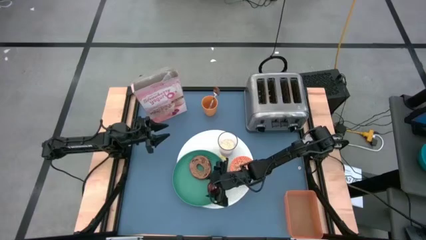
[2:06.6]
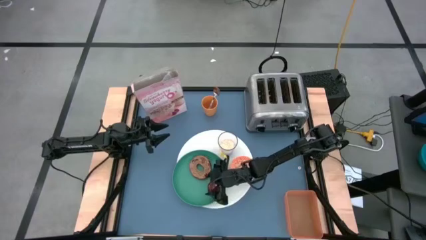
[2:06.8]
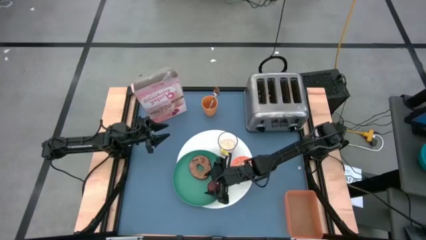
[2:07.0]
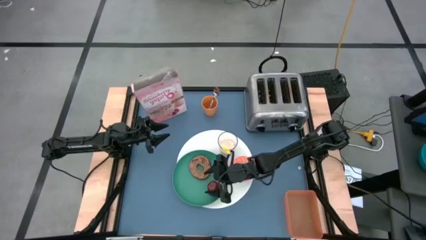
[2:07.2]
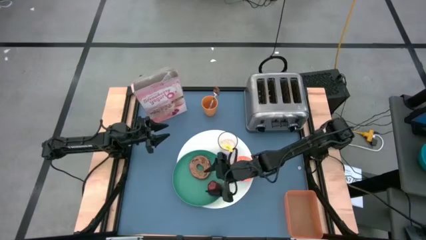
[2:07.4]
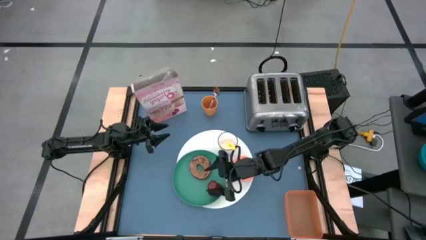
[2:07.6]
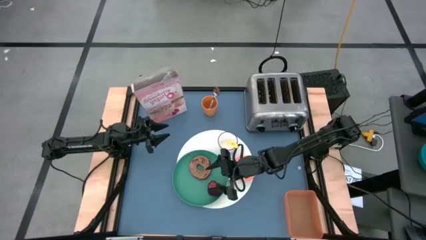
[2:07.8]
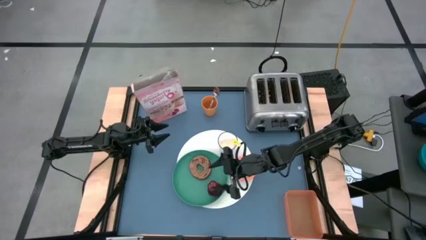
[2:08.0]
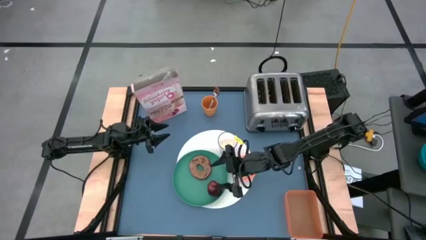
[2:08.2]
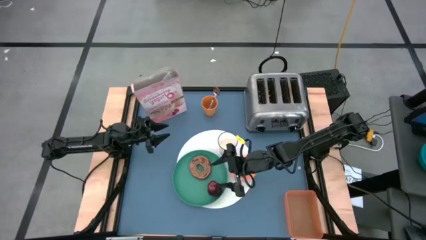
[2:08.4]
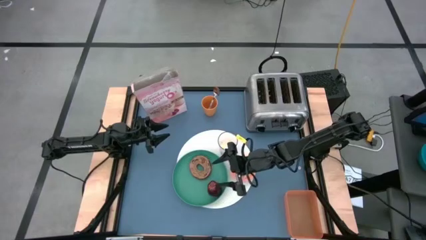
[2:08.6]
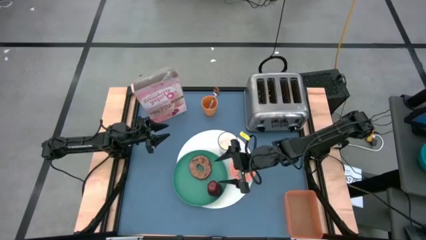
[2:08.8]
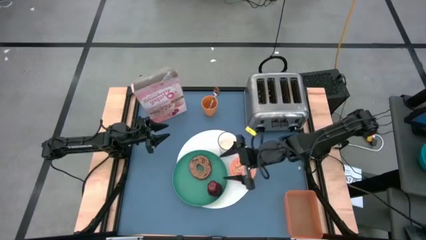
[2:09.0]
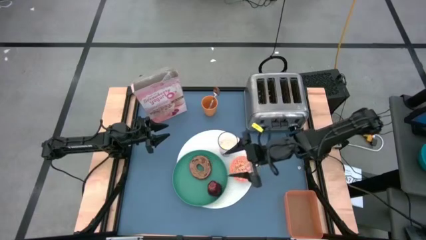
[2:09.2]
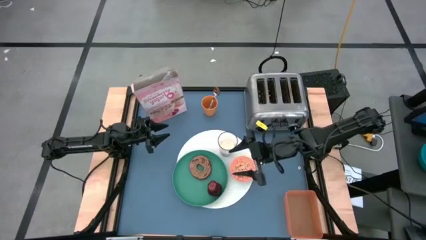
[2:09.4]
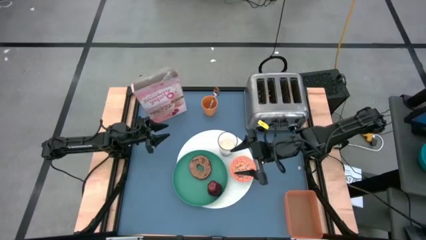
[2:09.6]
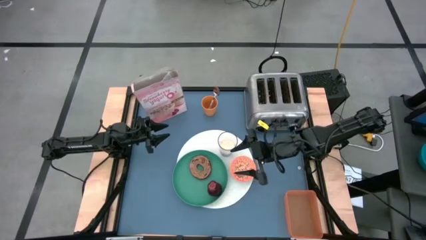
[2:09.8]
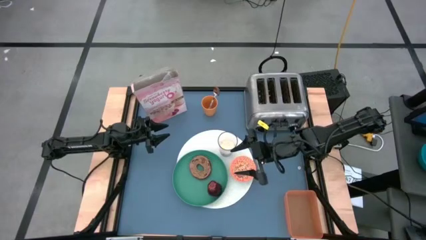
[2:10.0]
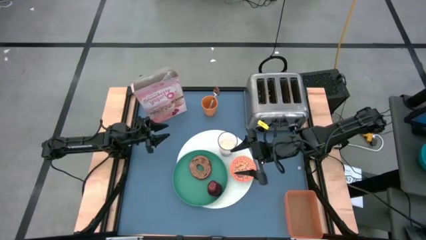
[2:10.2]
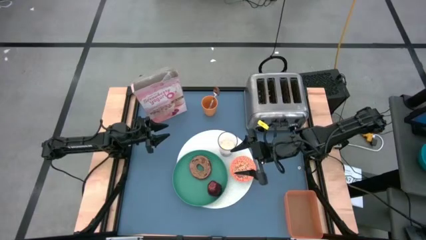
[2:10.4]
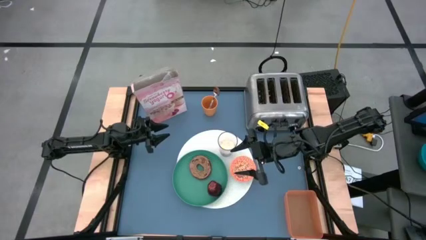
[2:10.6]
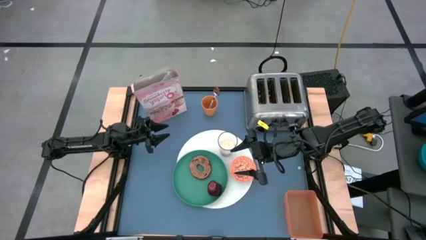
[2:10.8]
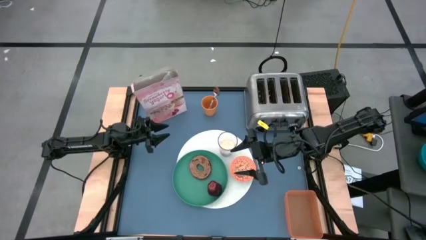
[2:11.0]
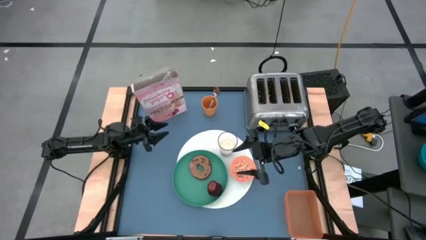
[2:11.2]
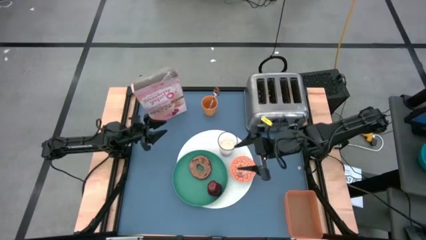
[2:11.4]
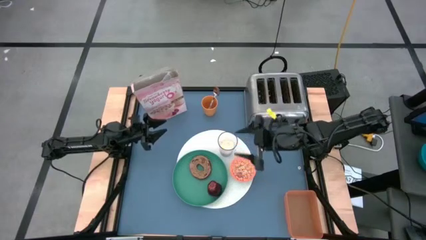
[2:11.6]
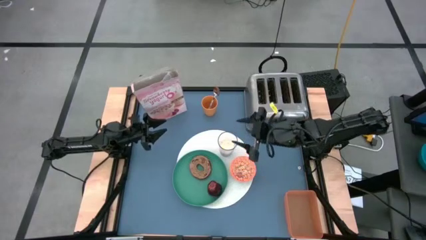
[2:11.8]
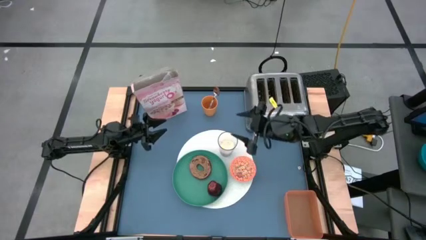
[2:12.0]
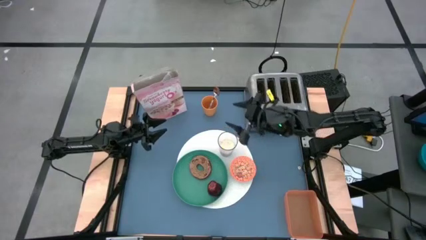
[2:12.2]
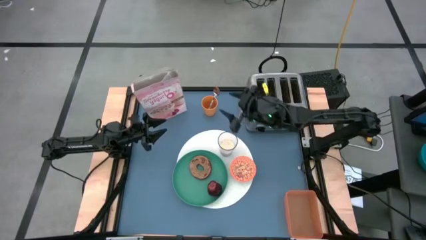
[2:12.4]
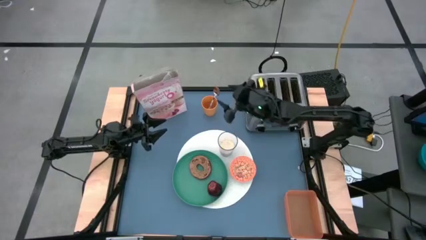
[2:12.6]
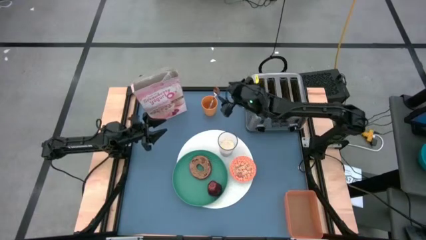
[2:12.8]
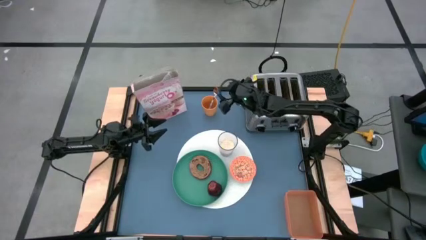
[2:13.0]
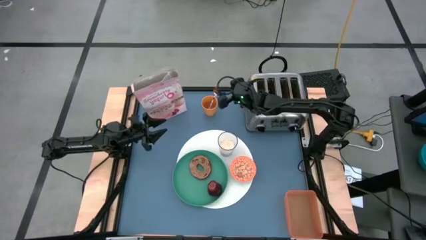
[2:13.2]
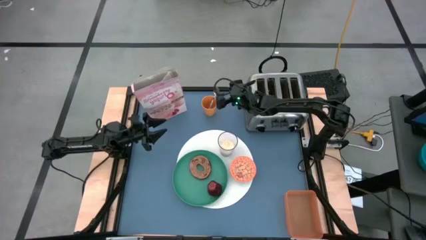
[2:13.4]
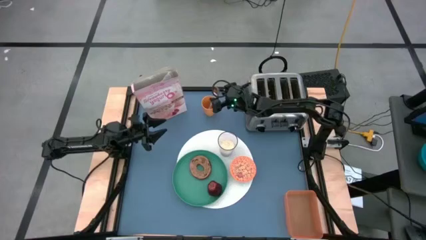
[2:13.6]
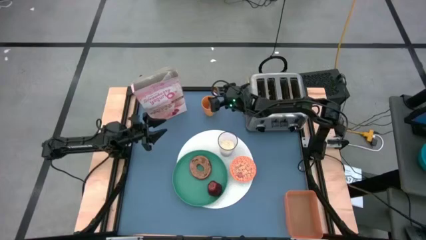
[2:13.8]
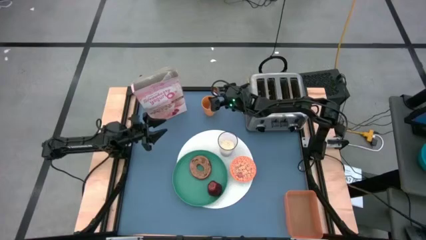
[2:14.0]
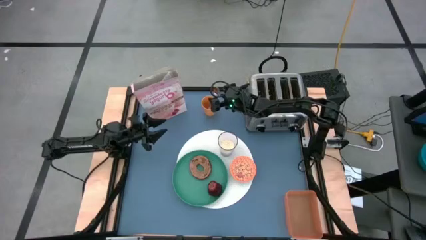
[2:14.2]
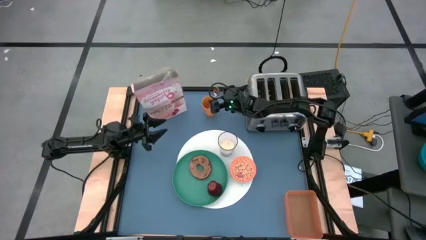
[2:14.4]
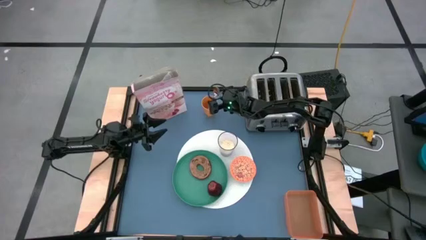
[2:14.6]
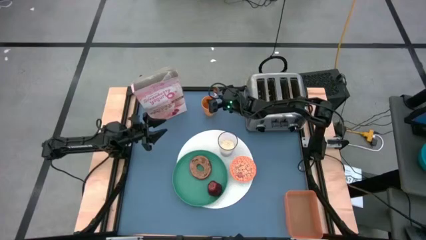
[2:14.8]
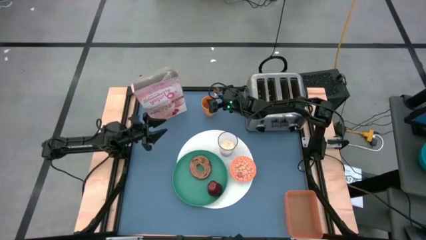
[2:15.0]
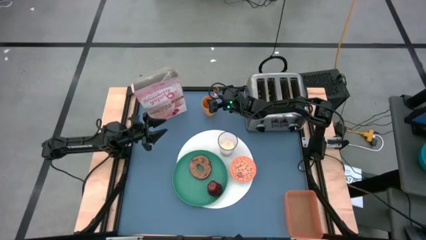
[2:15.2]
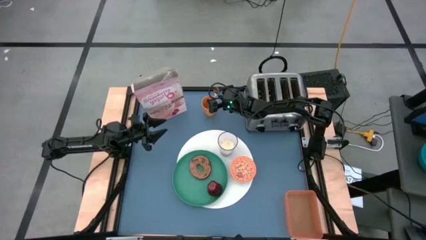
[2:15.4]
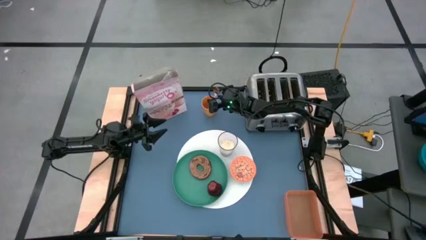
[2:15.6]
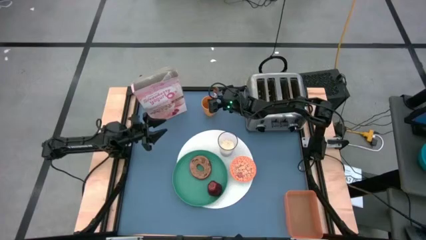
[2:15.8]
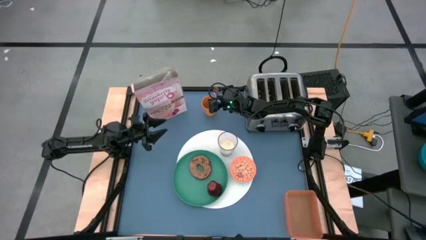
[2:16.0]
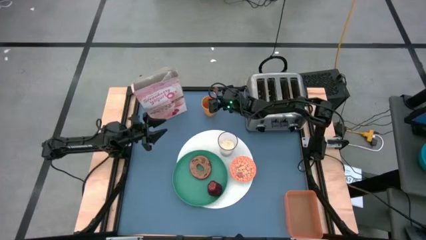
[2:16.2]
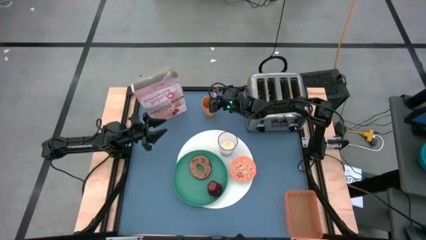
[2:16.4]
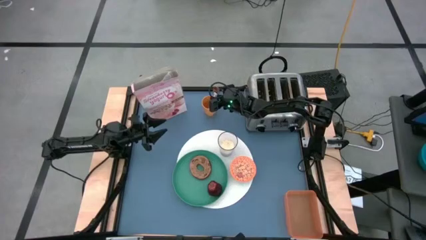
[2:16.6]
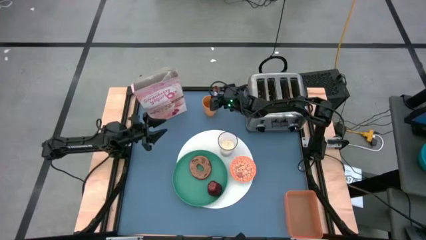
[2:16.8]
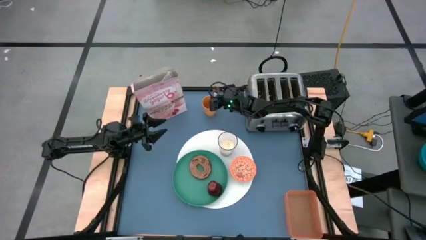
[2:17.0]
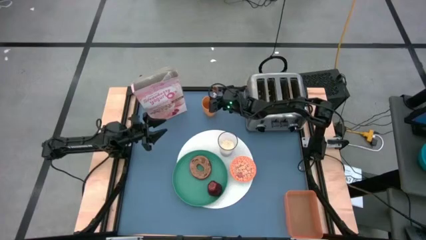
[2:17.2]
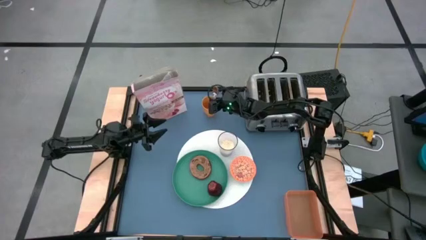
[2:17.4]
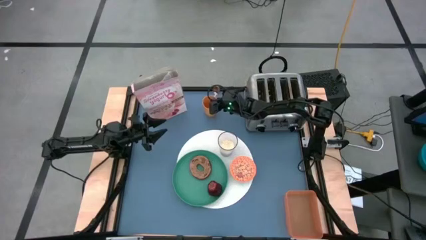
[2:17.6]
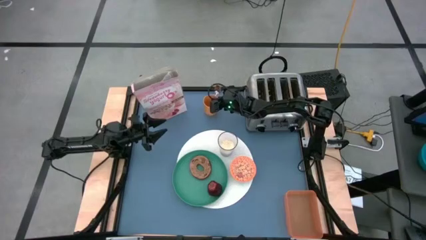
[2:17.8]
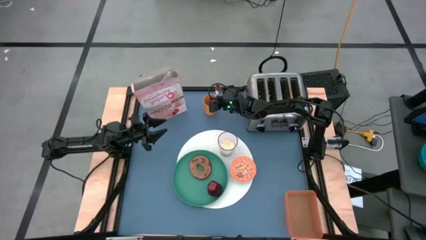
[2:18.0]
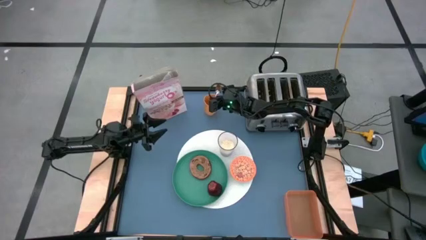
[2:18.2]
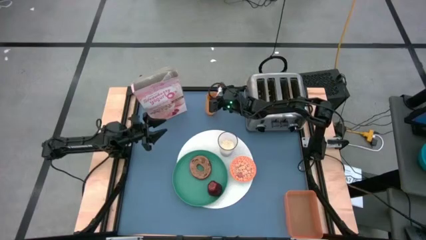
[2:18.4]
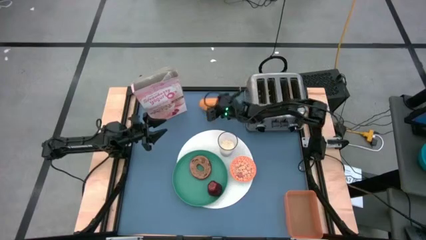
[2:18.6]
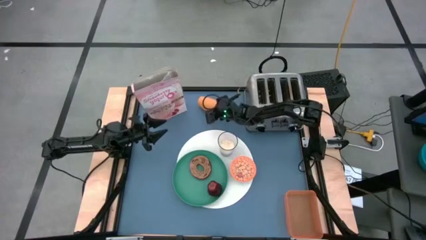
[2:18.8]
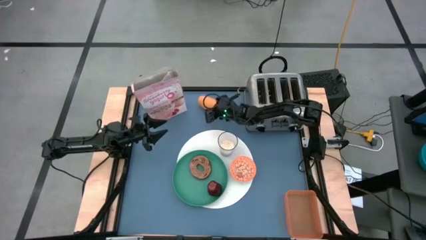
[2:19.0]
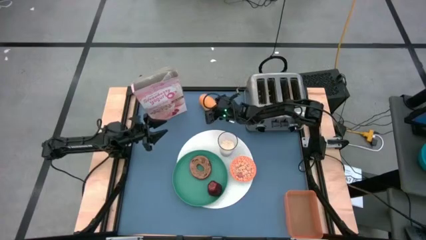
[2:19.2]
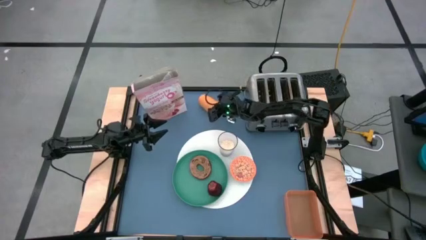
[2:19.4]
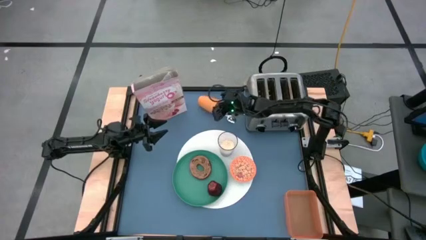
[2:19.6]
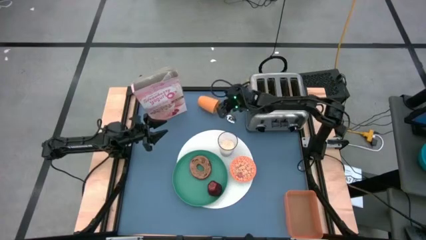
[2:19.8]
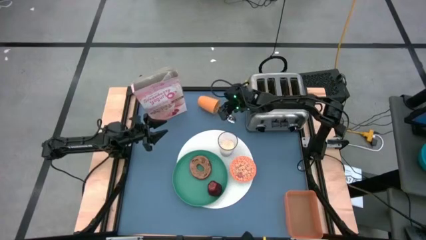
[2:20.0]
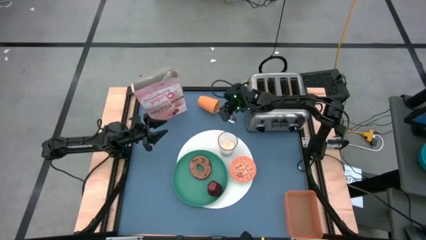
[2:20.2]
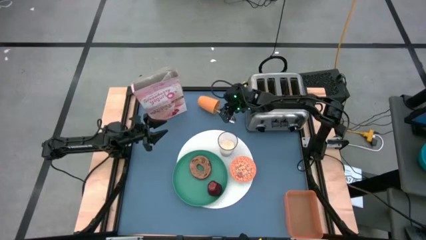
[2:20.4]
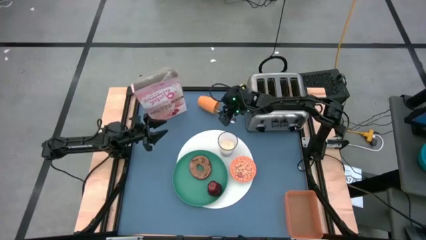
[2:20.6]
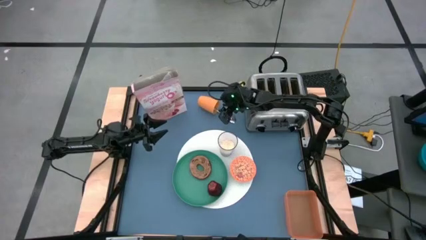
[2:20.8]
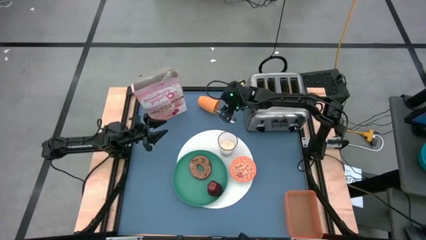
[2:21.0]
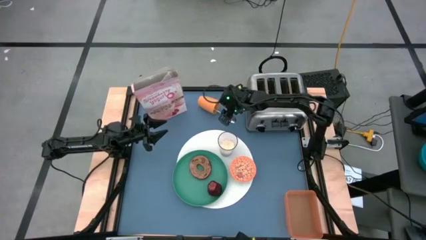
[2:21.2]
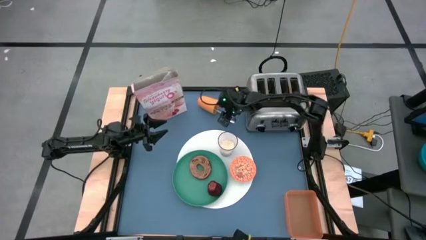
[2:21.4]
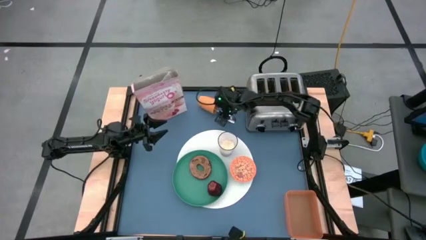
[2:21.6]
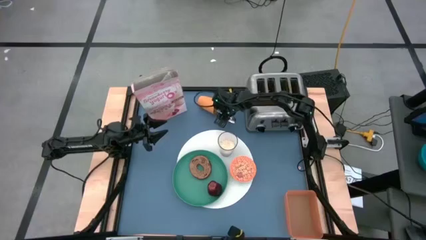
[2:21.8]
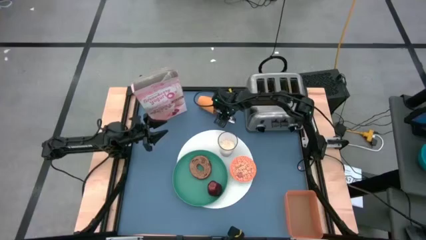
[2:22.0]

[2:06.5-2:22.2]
Task: Arrange a breakfast setting
Put the green spoon on the table to the right side of the orange bowl
